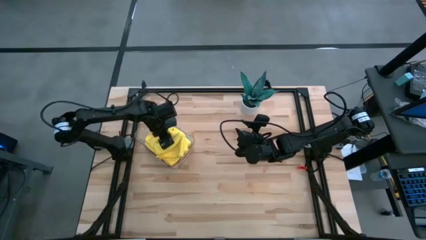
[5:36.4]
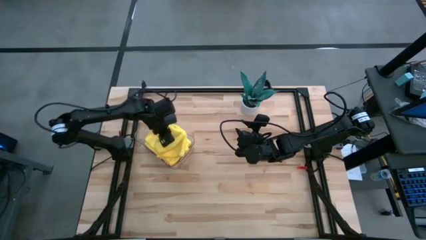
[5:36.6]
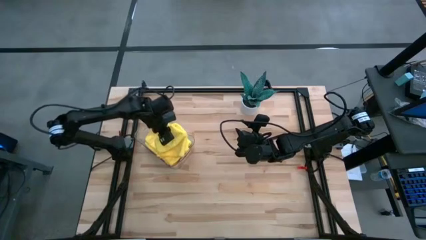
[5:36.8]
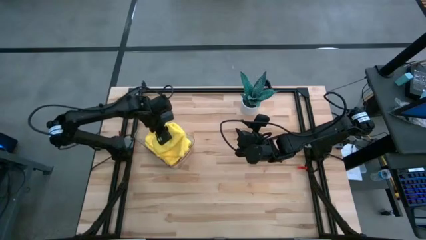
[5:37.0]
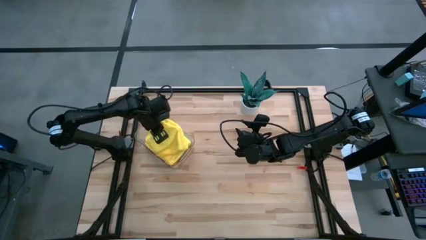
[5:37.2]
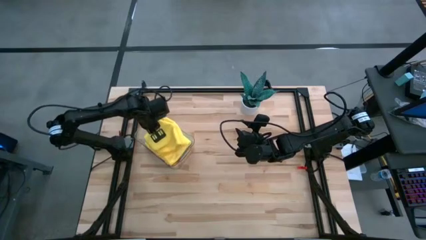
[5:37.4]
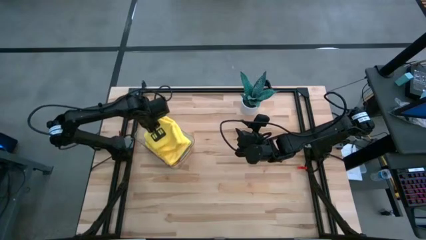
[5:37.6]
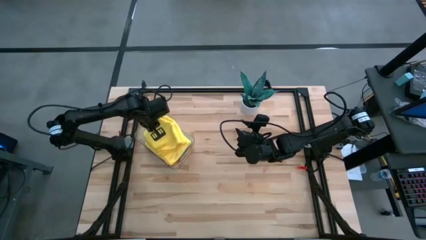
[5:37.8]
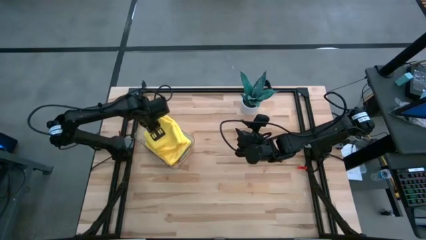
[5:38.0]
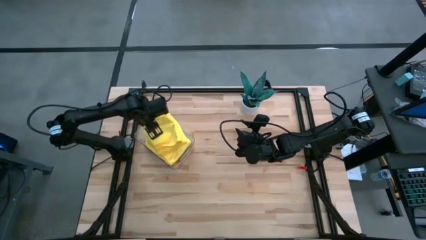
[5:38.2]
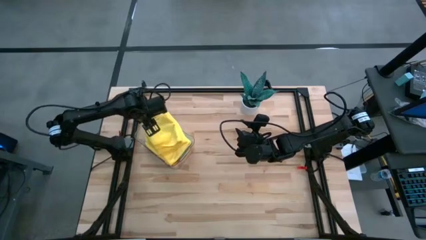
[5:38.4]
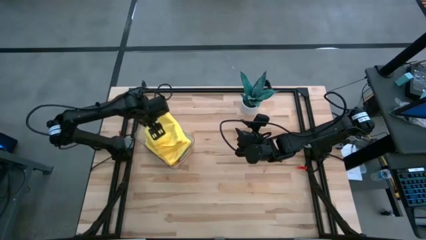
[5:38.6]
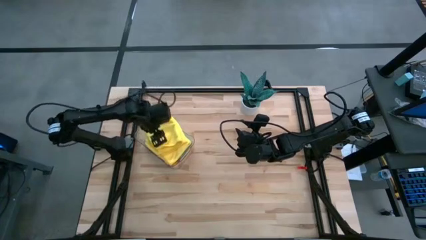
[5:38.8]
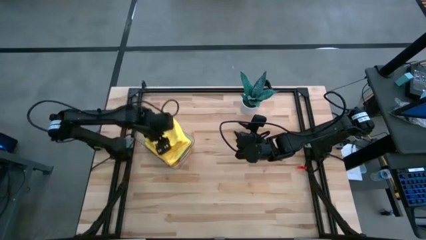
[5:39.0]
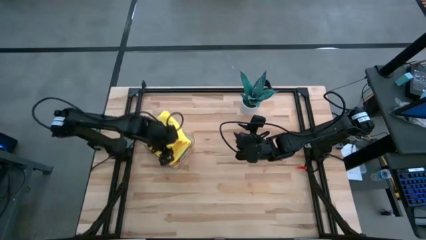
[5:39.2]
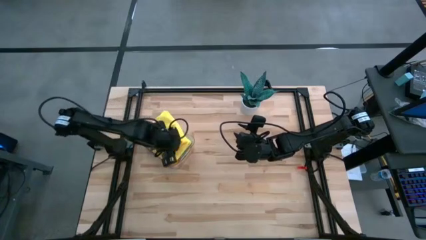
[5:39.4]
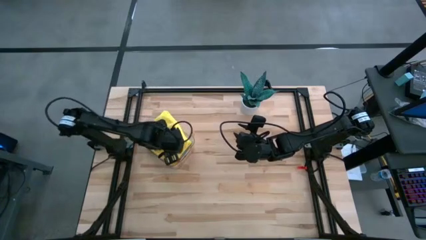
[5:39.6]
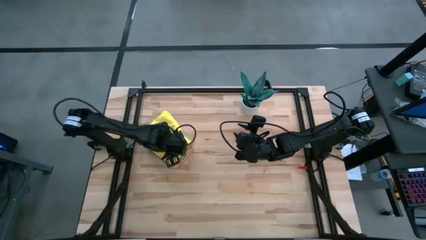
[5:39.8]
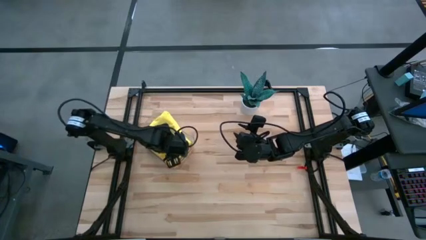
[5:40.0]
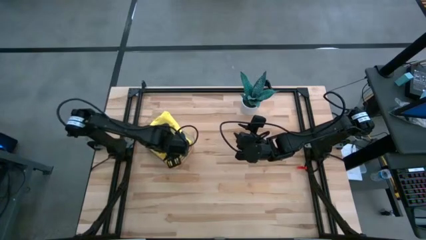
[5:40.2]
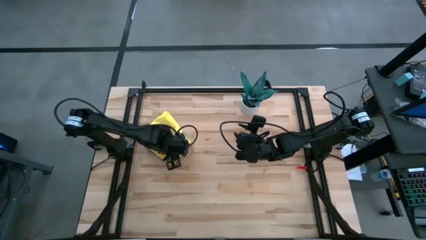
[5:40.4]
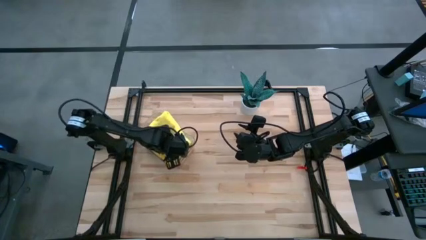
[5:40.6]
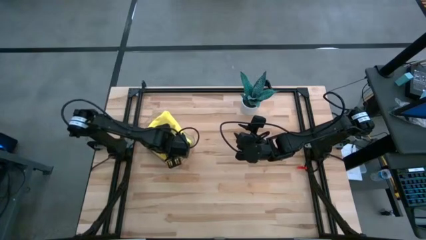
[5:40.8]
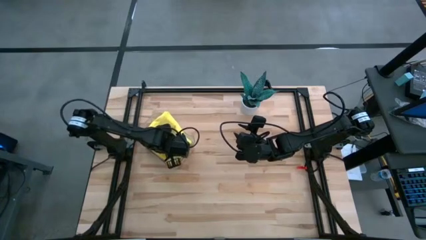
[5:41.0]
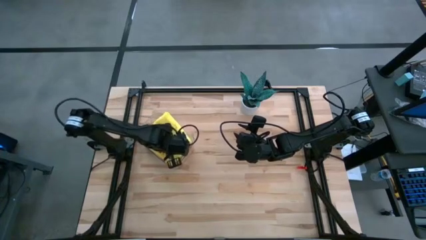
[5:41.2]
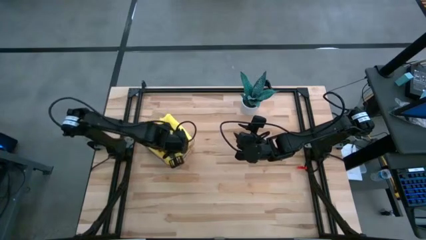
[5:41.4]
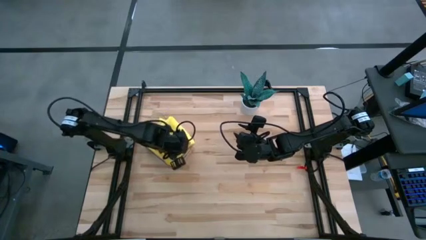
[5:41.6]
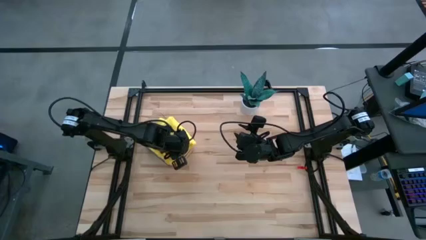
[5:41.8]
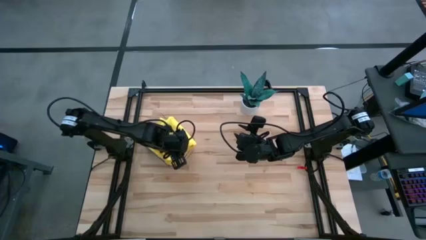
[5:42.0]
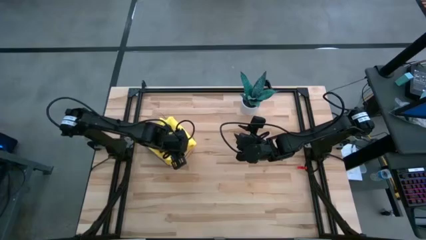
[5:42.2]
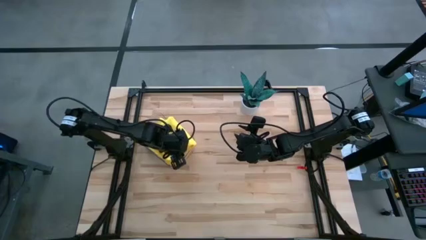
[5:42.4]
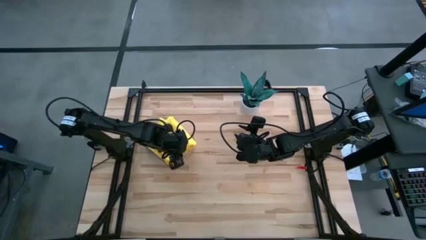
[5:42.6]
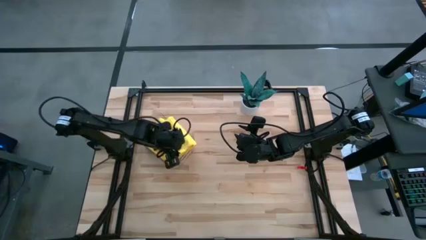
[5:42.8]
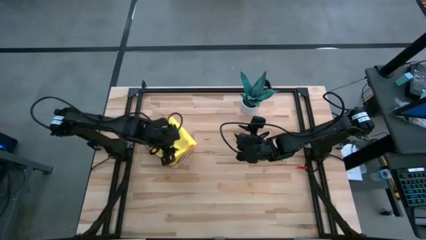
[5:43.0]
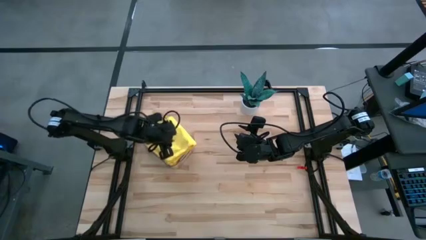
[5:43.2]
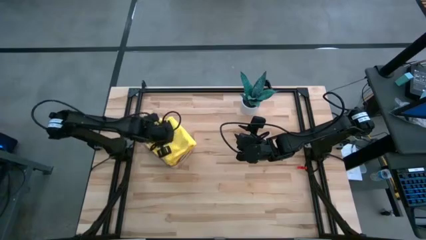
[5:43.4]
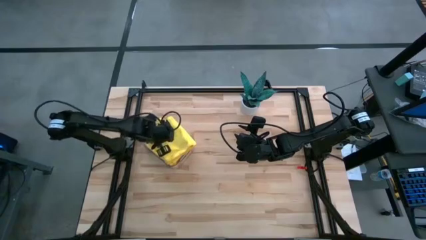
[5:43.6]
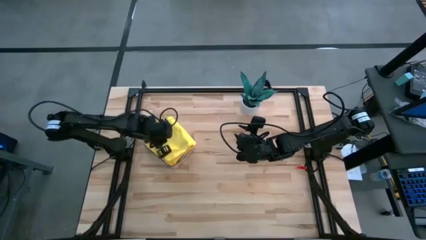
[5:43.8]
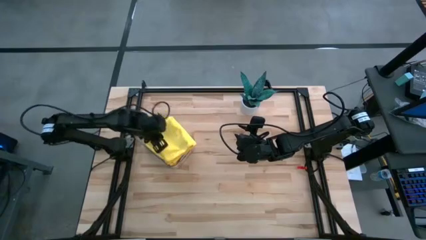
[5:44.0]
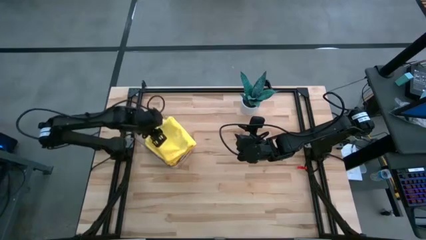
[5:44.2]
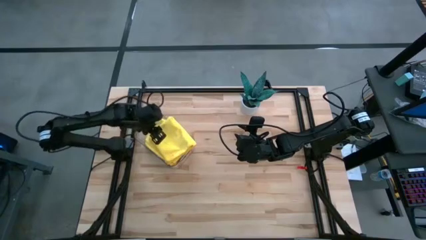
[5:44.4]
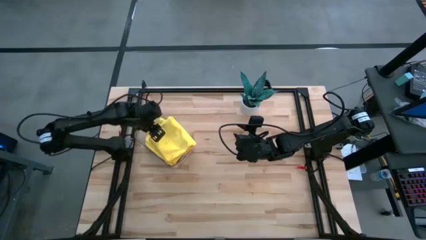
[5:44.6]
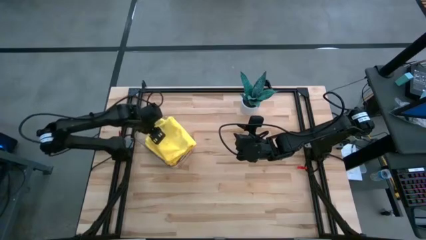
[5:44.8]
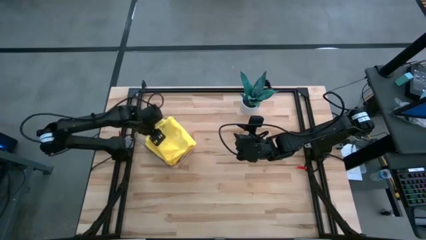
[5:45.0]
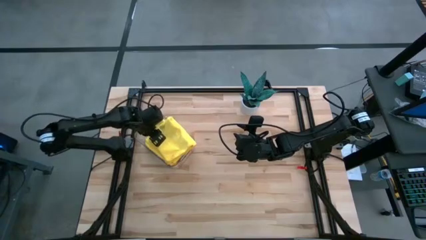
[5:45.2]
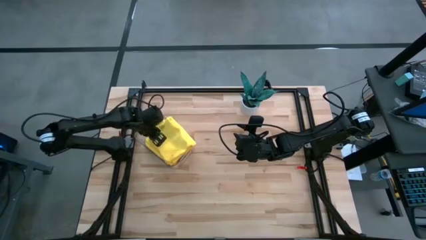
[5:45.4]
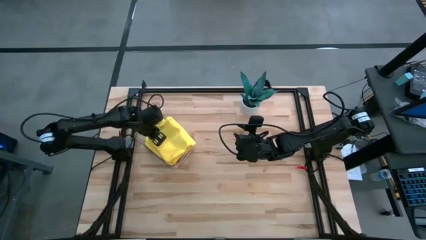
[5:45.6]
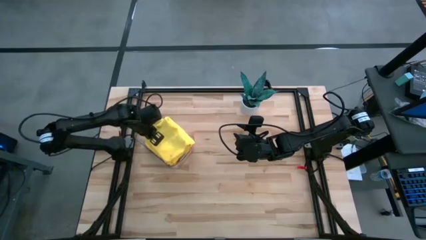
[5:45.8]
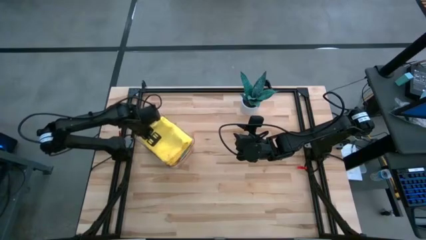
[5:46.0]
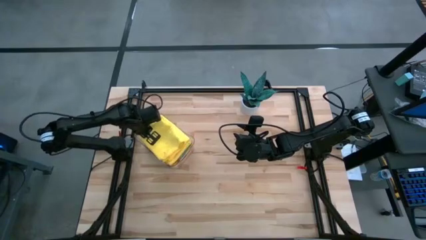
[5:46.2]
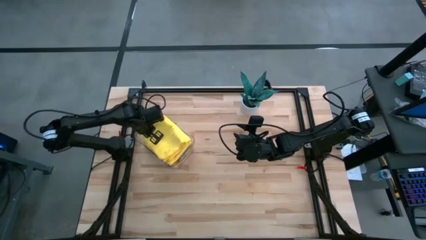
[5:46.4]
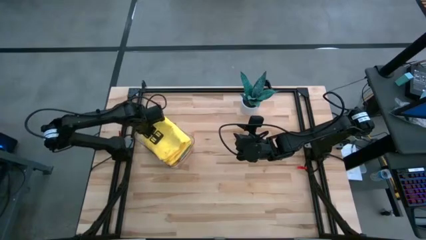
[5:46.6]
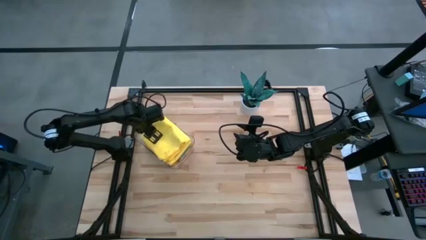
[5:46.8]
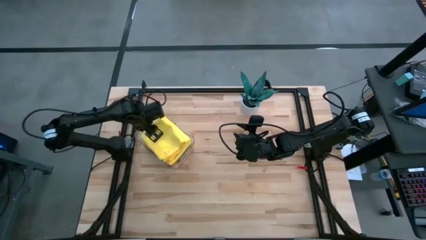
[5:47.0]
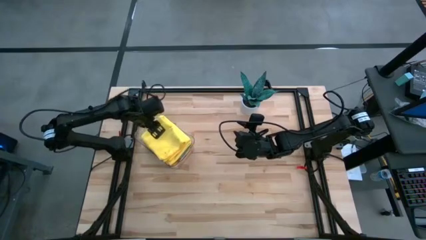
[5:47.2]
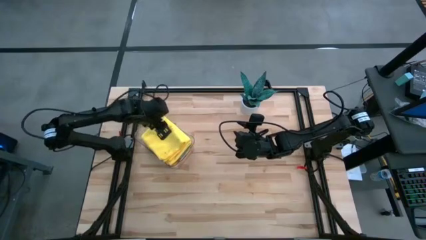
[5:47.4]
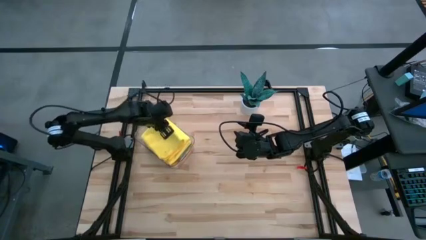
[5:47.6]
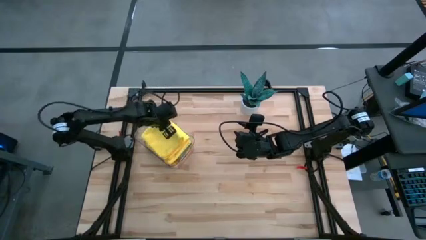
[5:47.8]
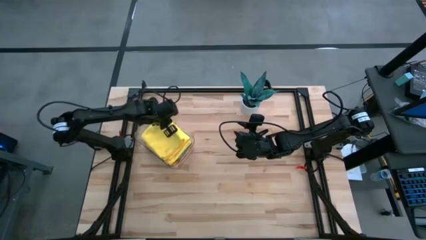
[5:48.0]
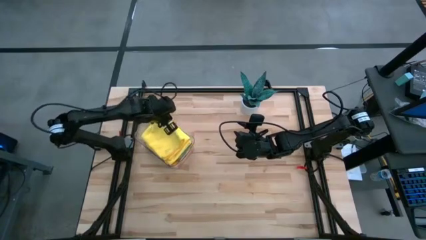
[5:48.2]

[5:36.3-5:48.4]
Task: Fold microfiber towels
Put the yellow microfiber cloth into the transparent bin
